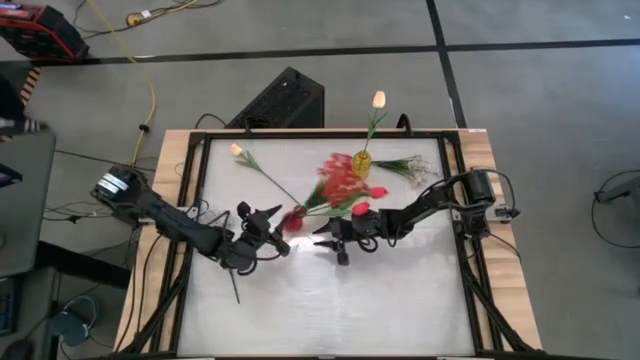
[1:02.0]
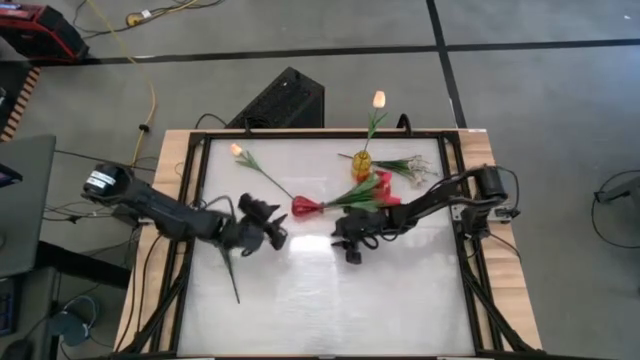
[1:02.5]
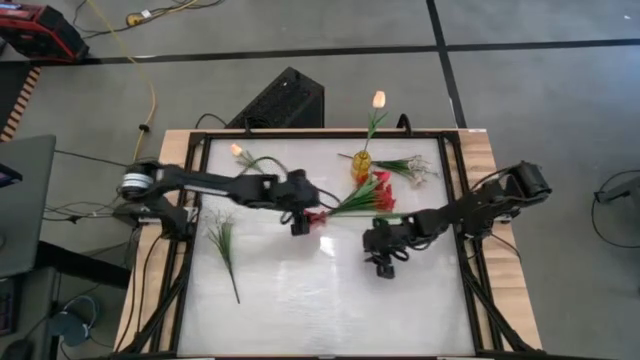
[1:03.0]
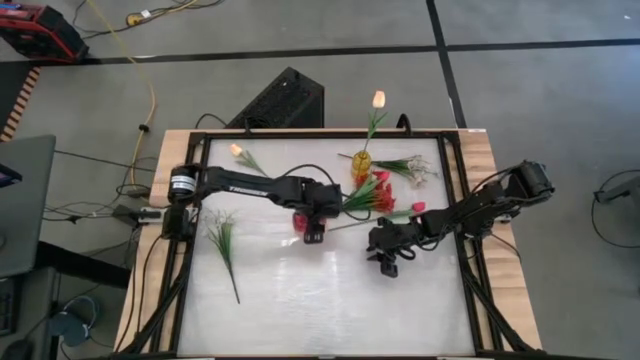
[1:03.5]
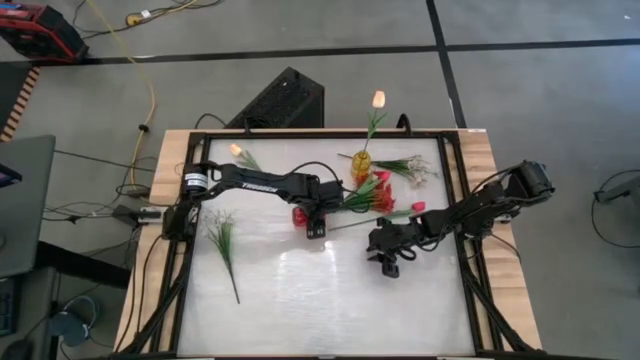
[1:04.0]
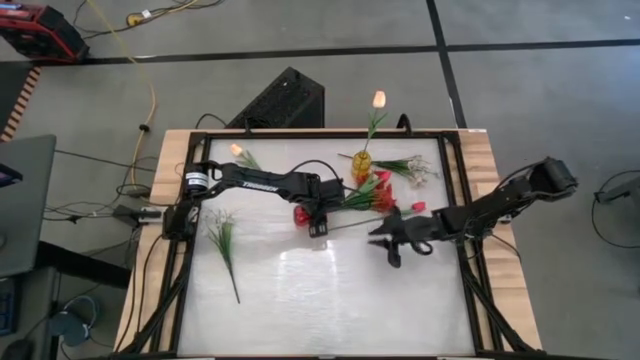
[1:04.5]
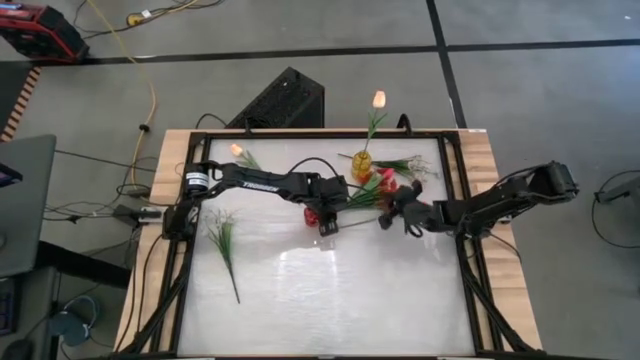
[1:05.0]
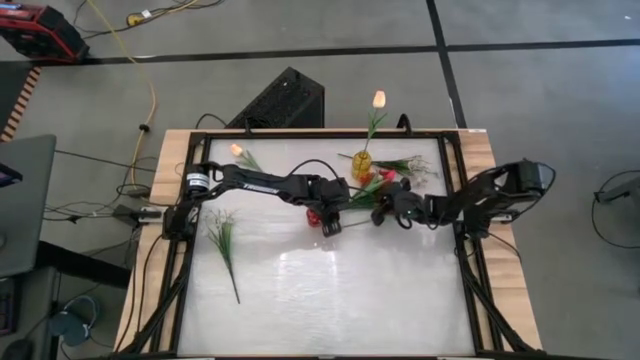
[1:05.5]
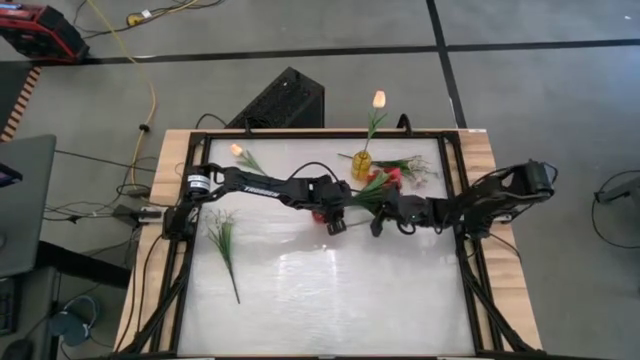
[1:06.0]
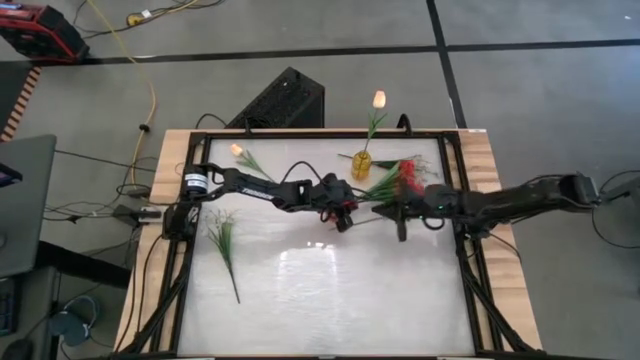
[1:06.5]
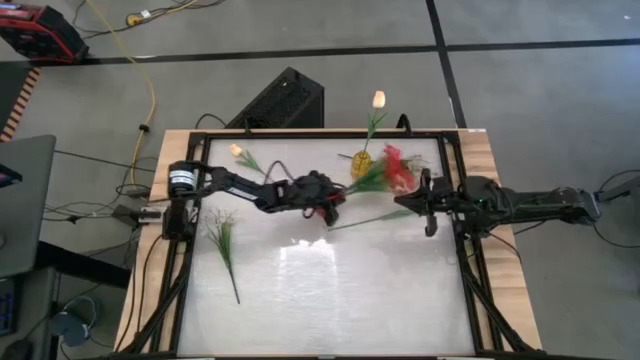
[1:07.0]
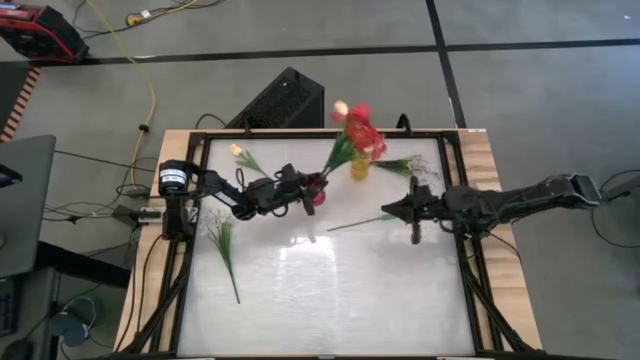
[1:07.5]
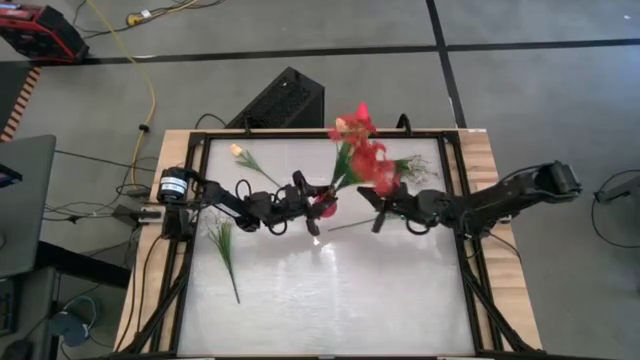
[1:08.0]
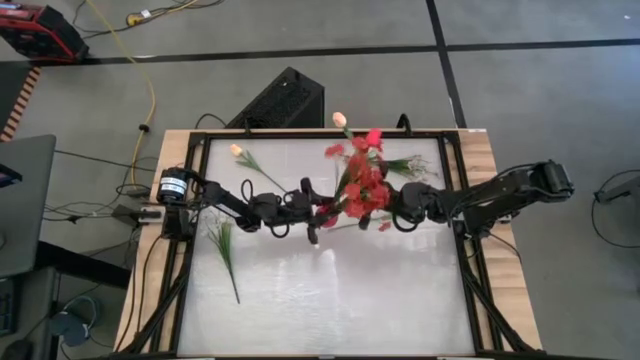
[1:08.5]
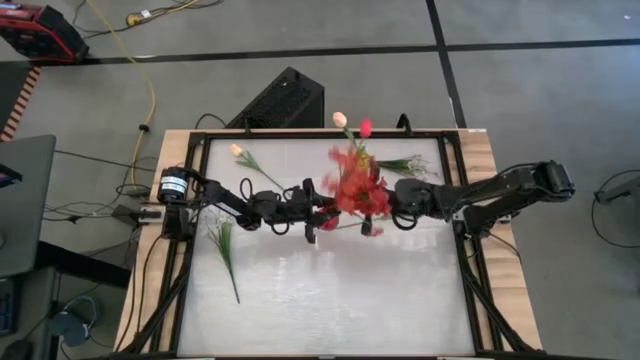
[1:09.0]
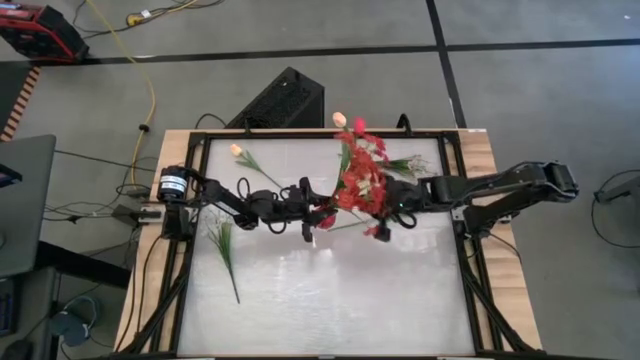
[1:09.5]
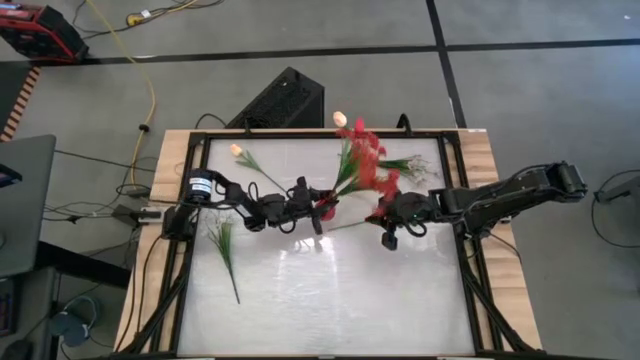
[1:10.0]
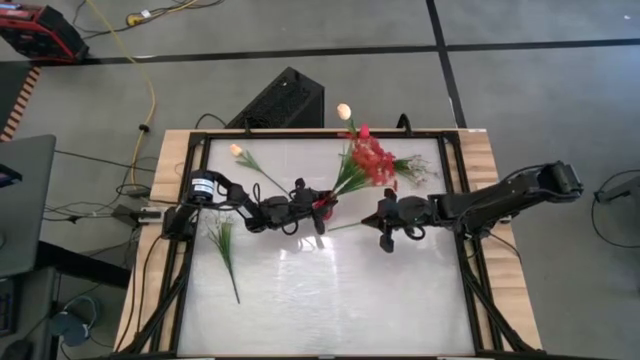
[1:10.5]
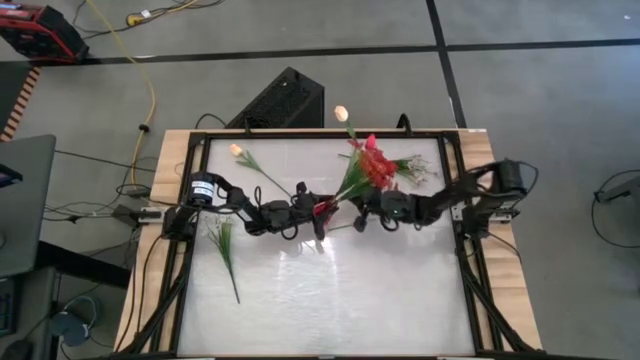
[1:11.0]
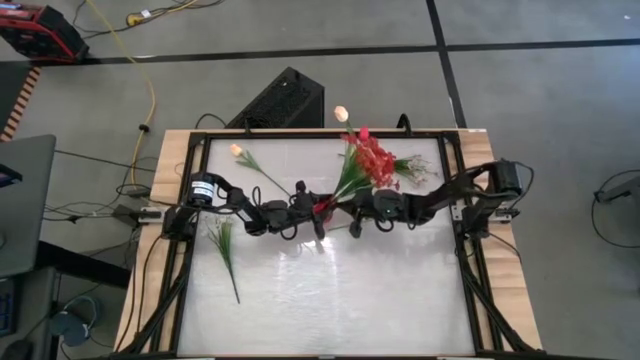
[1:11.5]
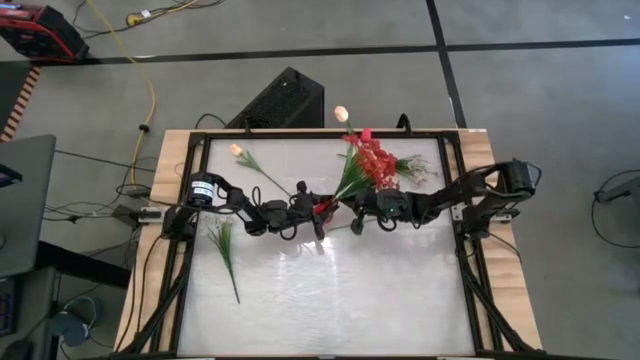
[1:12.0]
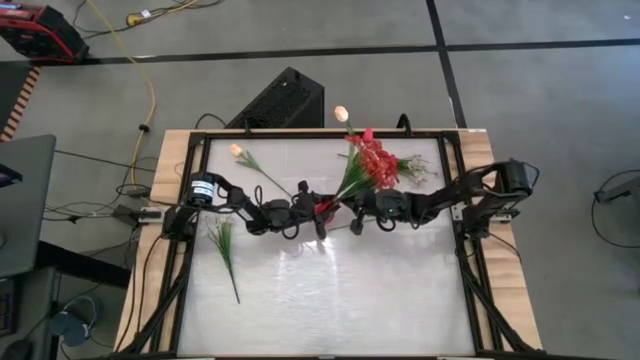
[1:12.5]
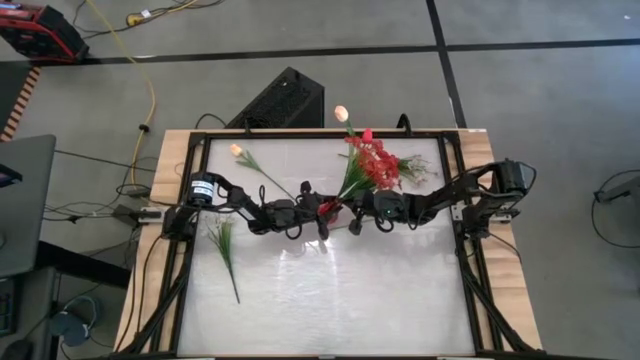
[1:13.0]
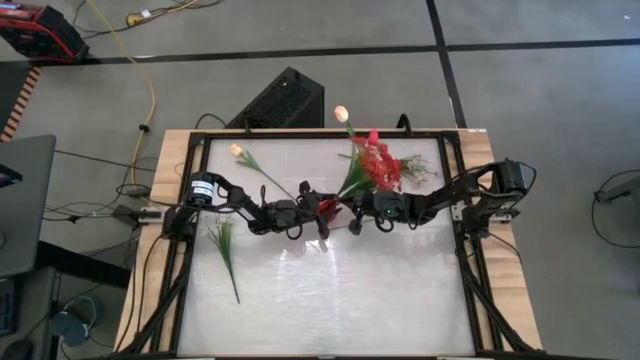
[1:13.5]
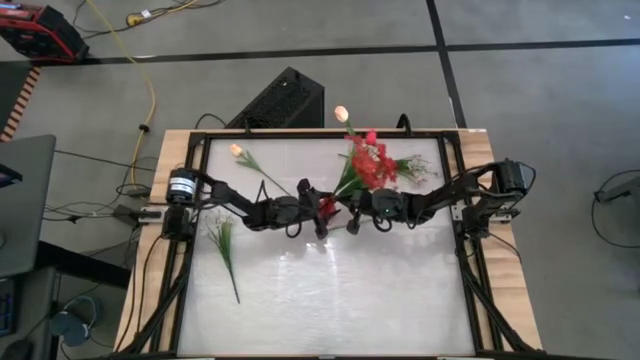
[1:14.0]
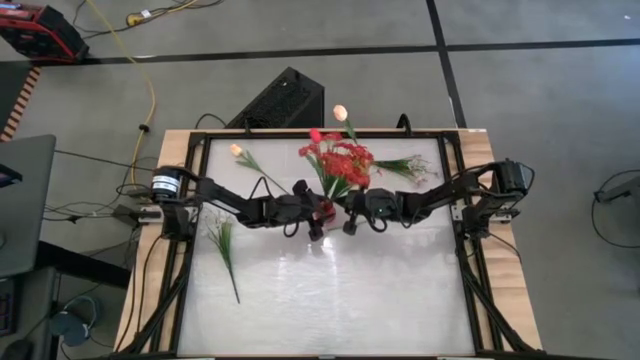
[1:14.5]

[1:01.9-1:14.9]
Task: Sort flowers into vase by color
Adjust the red vase

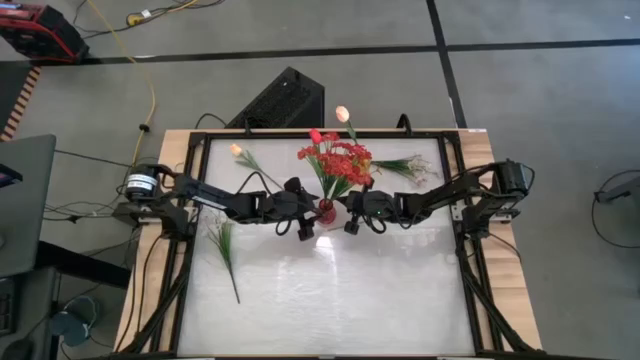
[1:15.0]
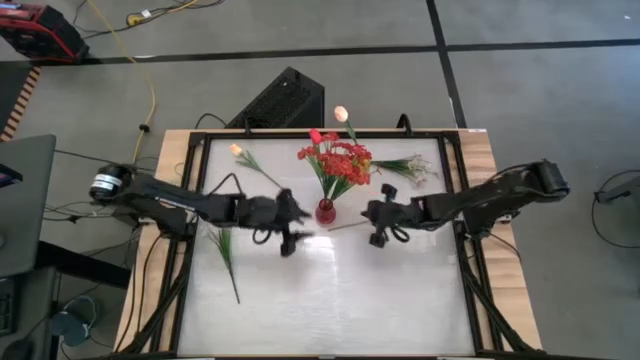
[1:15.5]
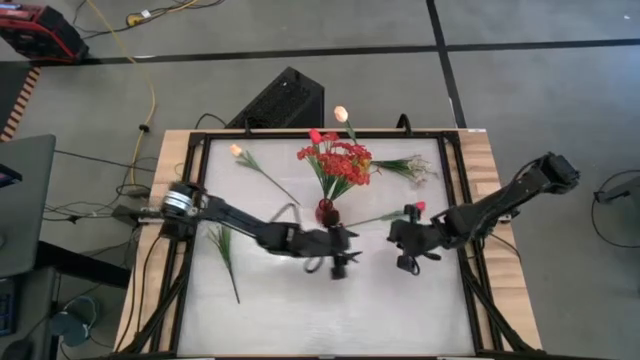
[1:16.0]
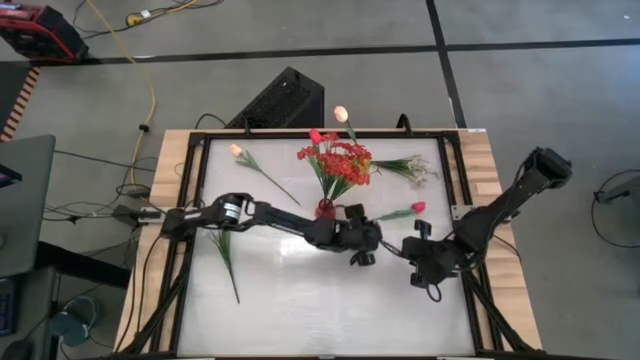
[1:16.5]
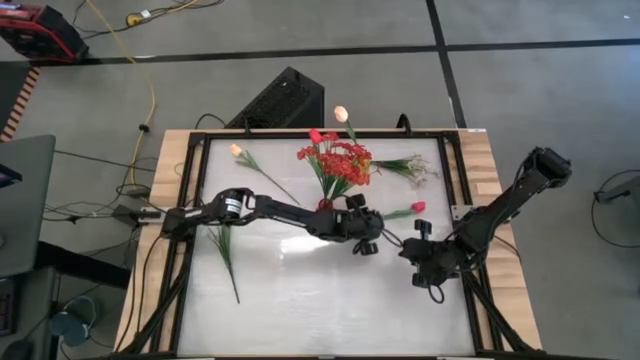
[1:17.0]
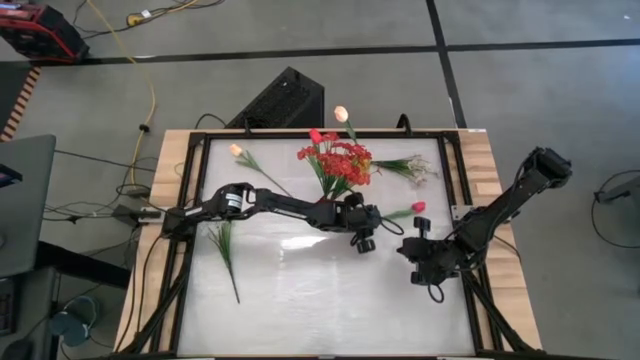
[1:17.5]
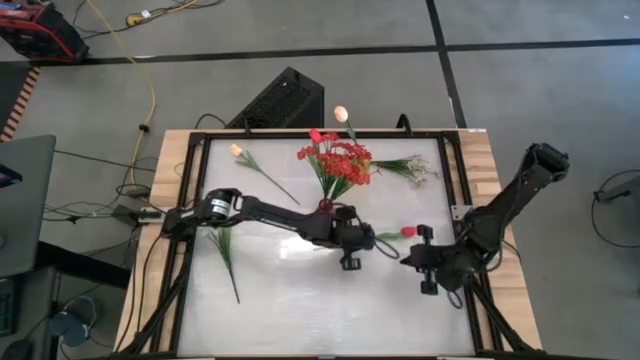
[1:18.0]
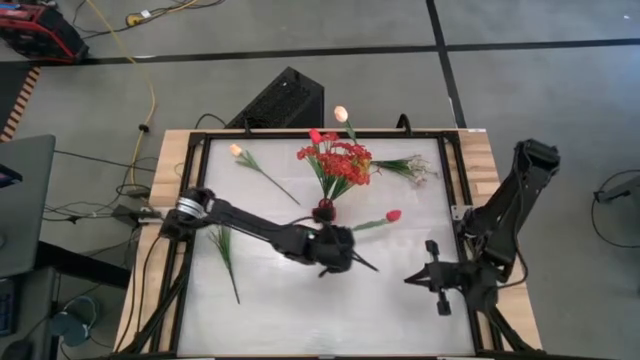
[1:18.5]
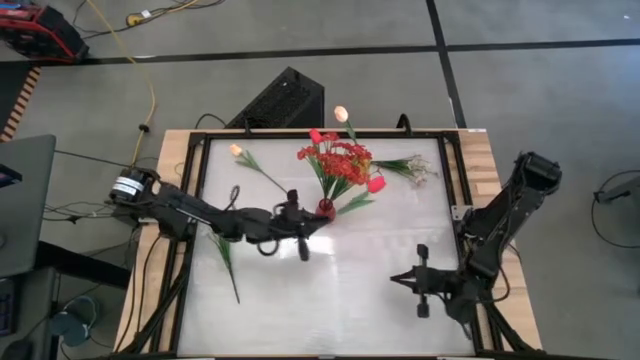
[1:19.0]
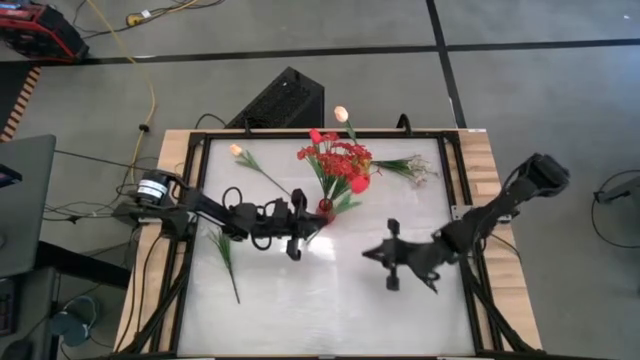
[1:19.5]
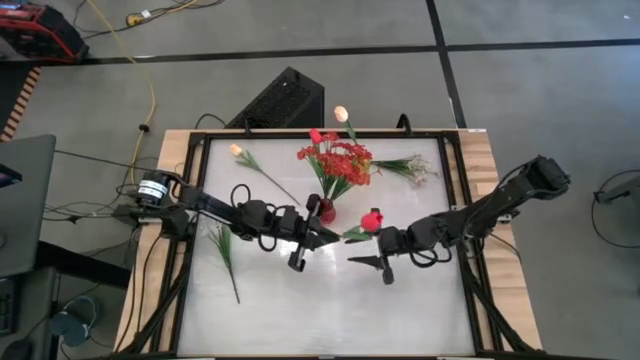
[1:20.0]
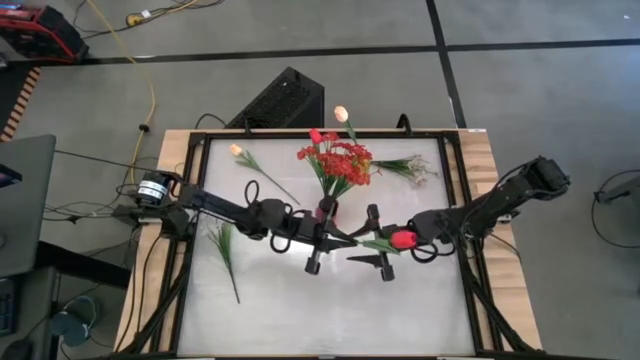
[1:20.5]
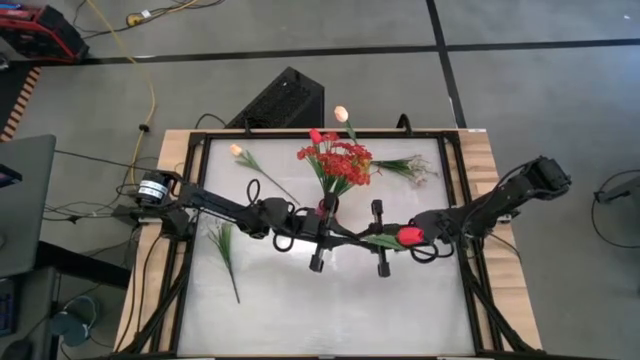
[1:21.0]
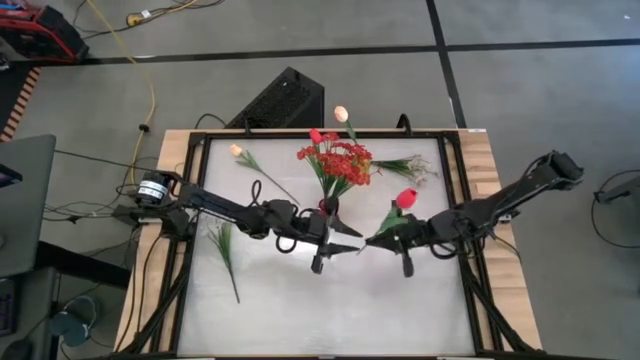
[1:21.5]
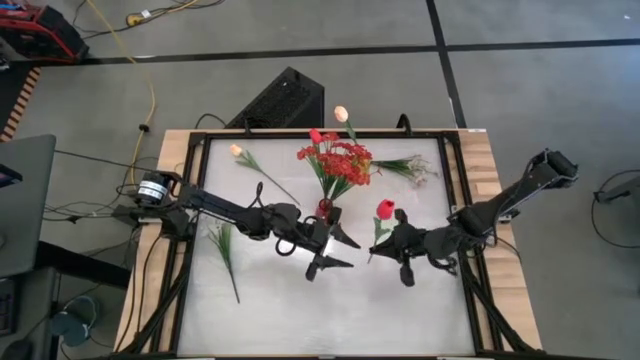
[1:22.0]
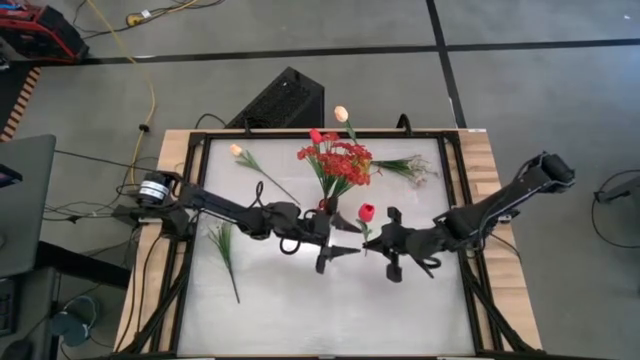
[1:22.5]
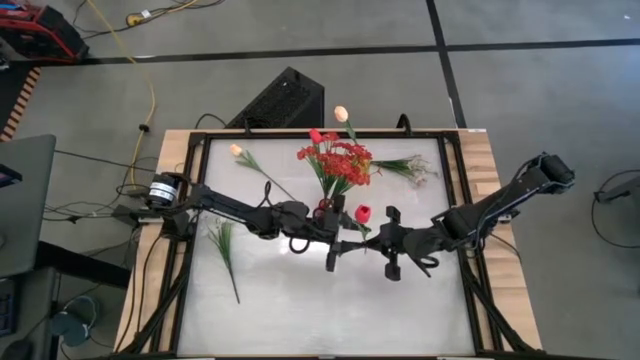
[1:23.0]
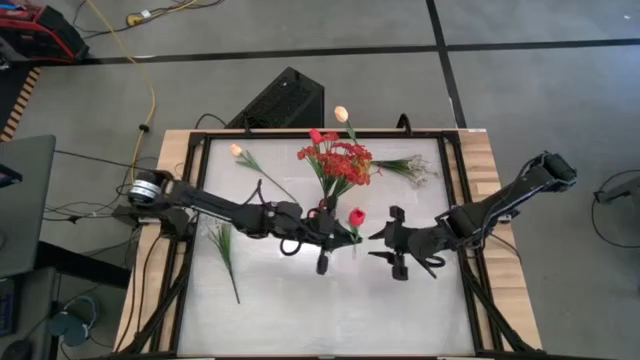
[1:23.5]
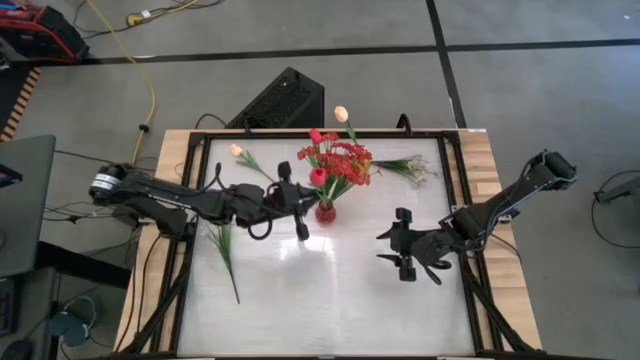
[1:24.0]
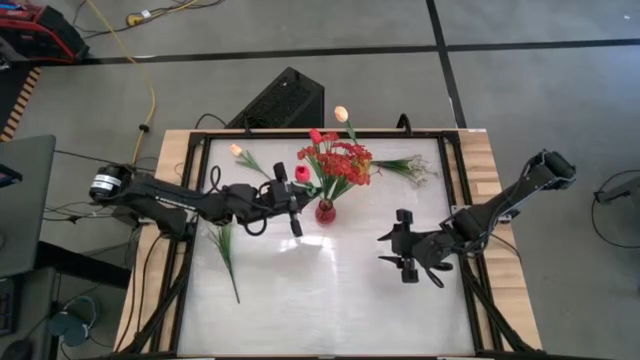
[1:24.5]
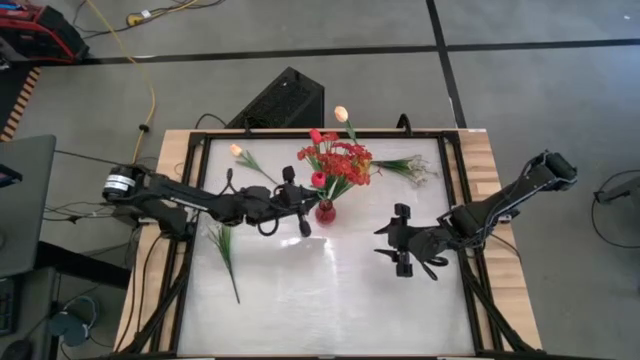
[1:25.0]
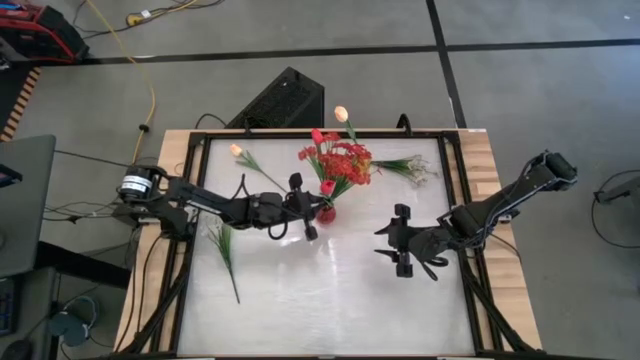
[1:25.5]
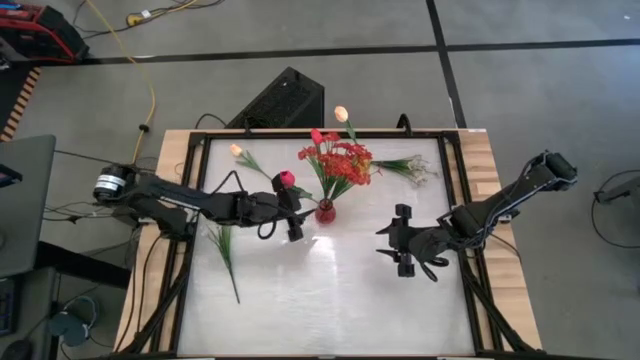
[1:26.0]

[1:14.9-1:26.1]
Put the red tulip into the red vase
